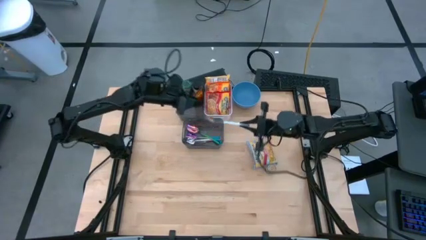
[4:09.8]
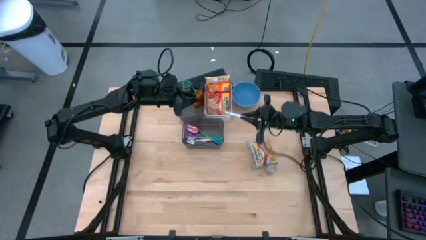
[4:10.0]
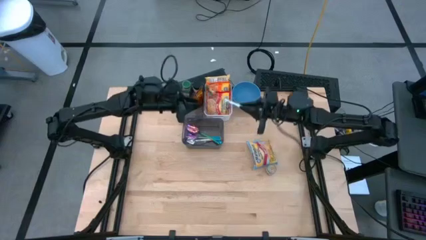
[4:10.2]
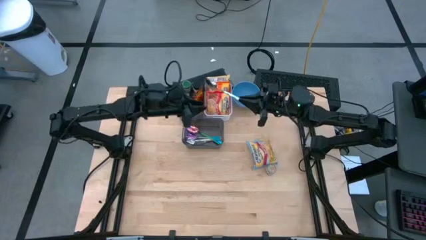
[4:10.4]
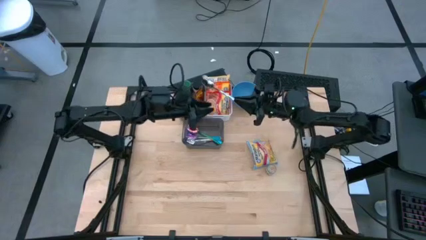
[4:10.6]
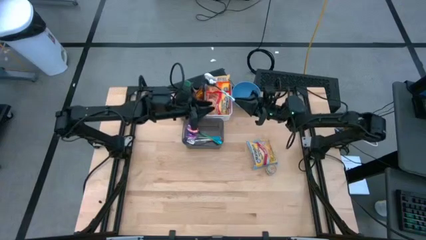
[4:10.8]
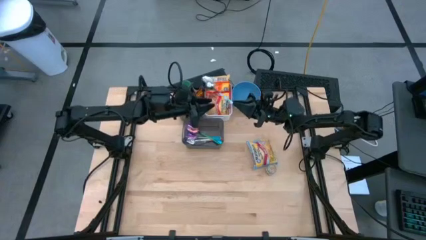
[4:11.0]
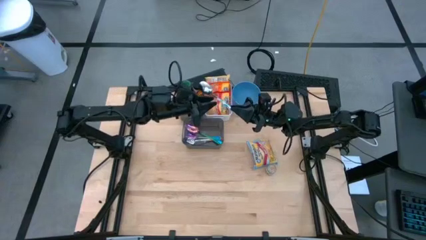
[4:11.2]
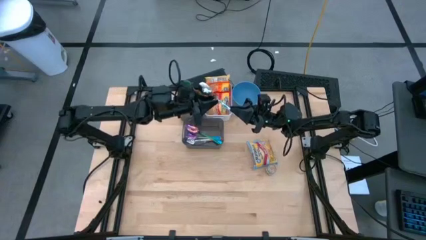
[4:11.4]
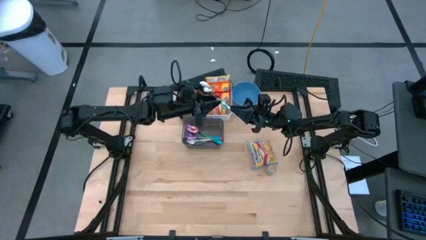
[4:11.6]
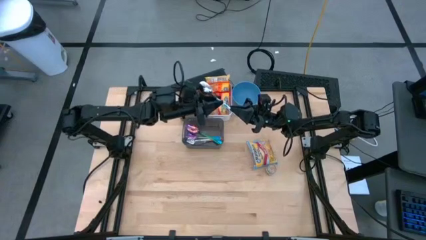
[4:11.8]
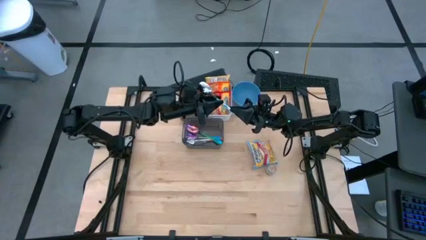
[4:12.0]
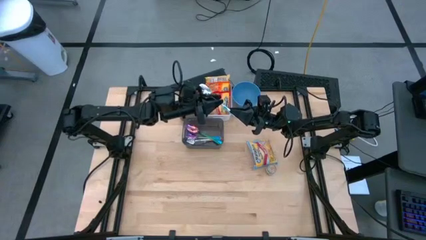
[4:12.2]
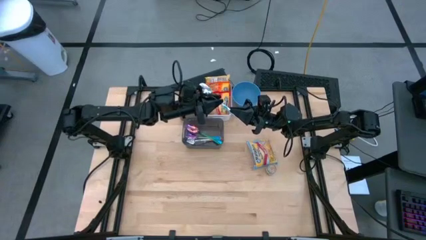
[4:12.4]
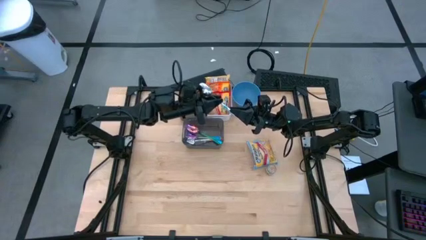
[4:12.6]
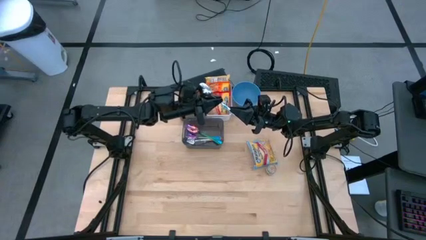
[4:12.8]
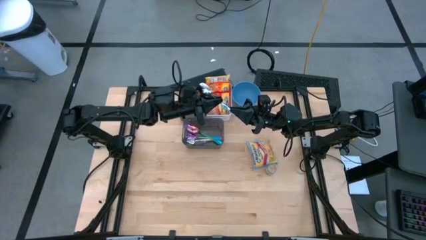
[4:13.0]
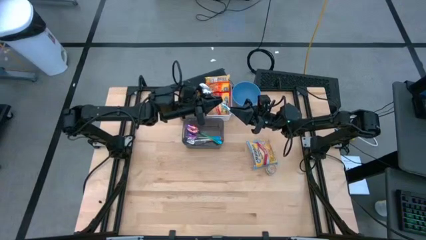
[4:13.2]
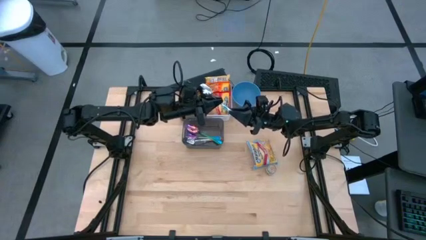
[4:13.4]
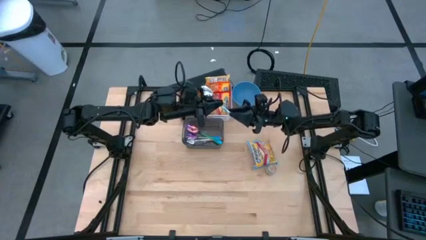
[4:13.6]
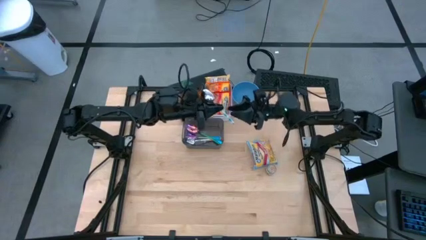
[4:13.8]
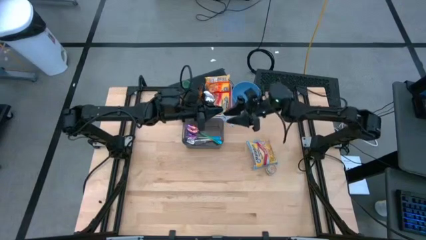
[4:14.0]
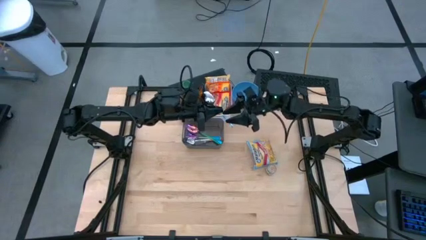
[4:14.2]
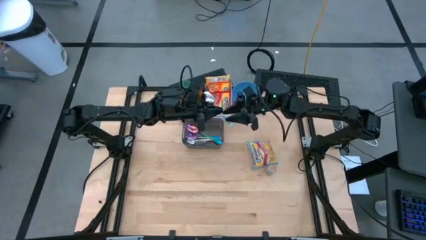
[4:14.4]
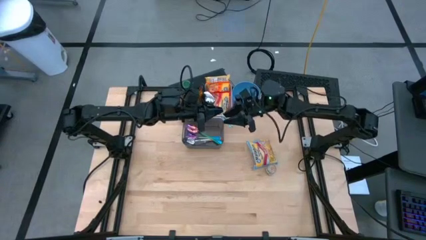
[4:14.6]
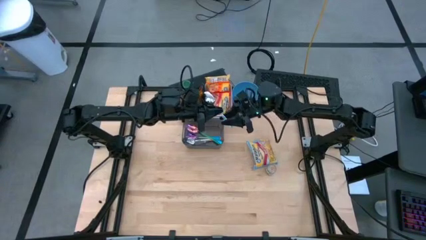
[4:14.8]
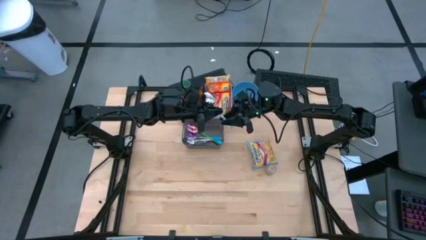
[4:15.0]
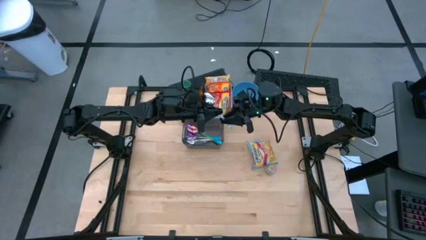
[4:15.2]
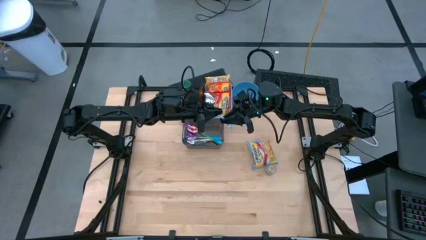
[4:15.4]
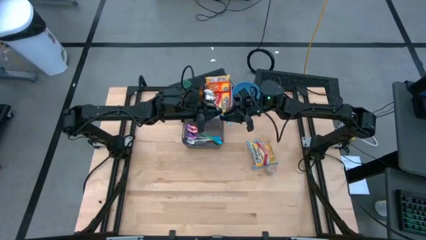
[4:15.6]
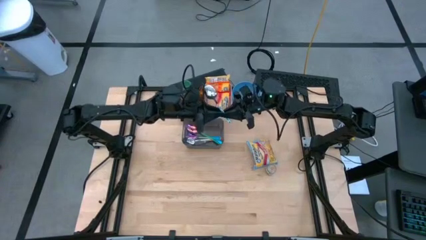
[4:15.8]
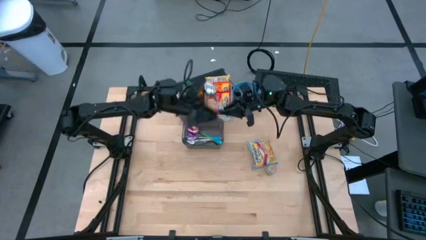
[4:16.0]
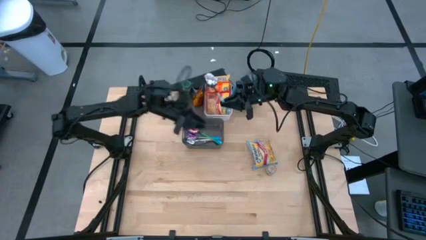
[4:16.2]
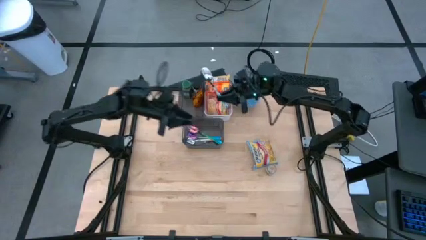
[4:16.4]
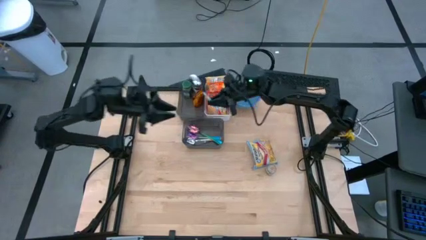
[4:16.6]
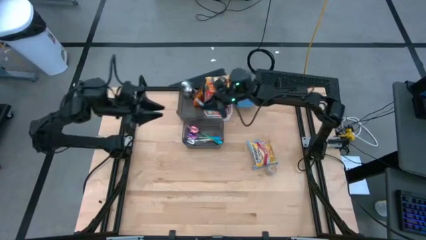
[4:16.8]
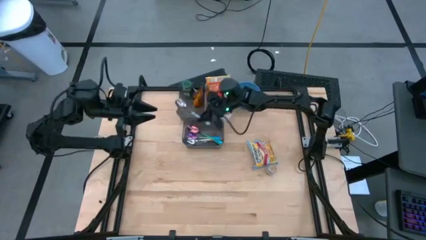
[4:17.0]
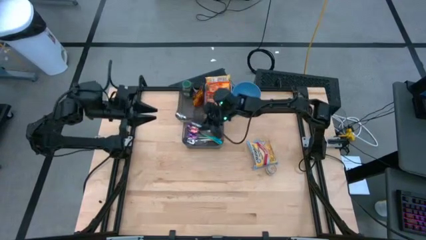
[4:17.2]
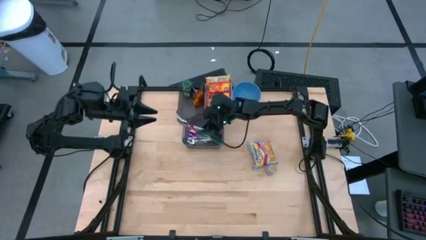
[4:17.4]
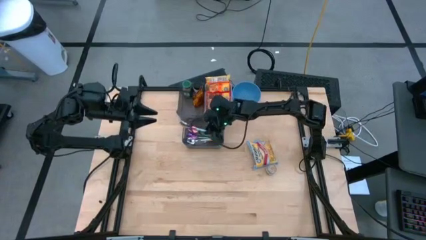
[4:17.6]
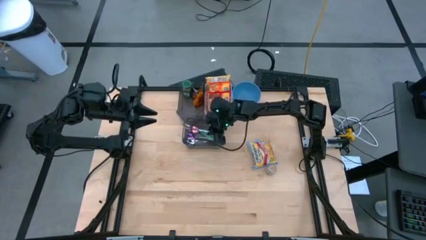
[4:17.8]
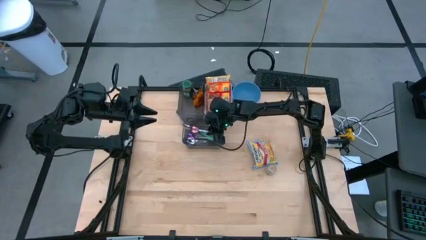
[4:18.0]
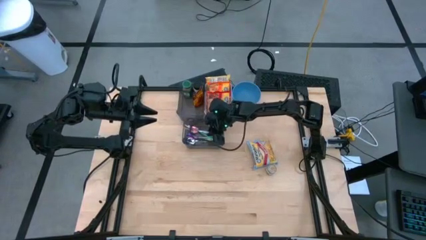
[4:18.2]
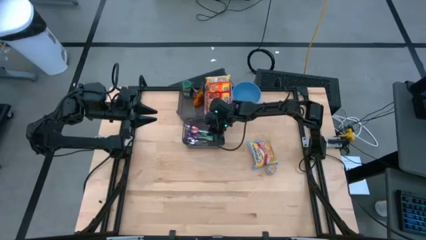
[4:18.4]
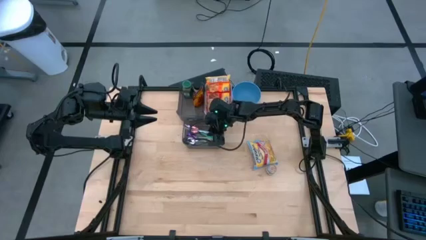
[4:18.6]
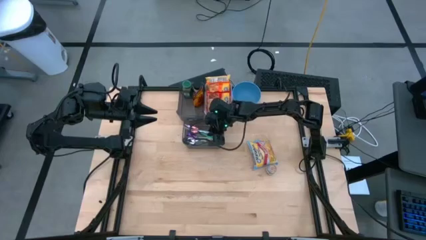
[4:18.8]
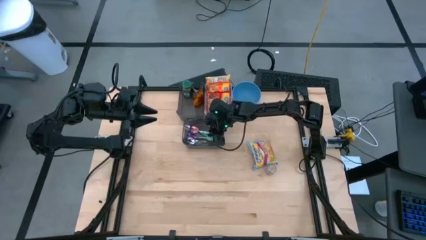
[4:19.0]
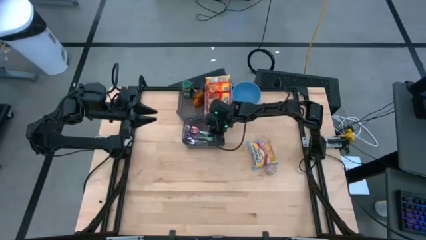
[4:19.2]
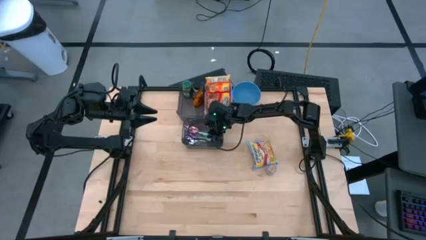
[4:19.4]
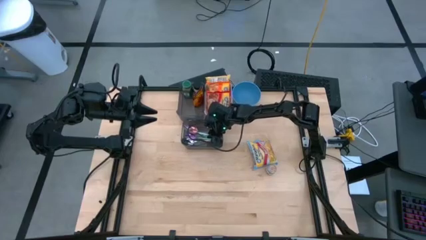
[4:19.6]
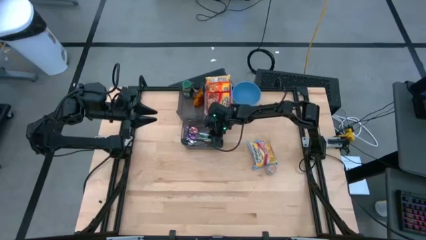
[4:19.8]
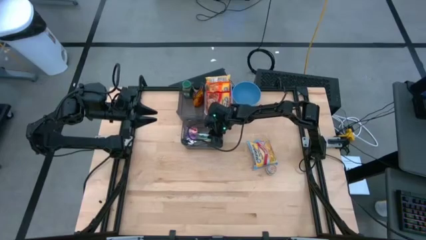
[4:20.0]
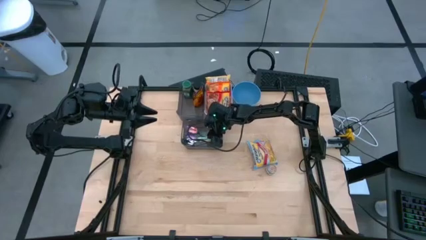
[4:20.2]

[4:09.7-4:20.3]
Task: Pick & Place Food Item
Put the blue patterned spoon into the bottom black bin

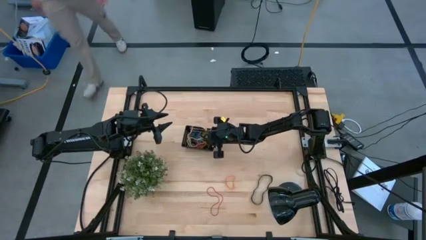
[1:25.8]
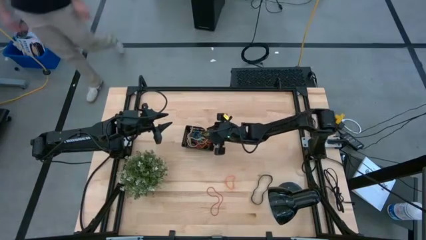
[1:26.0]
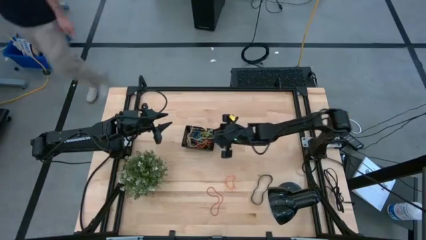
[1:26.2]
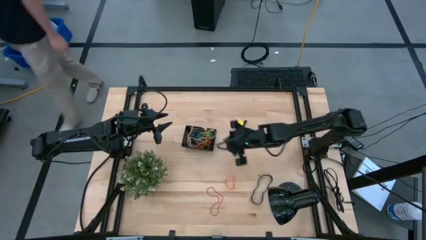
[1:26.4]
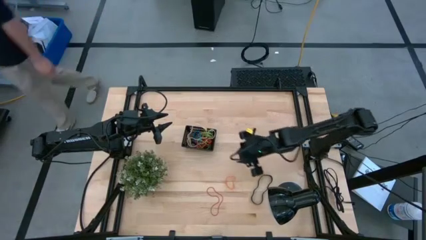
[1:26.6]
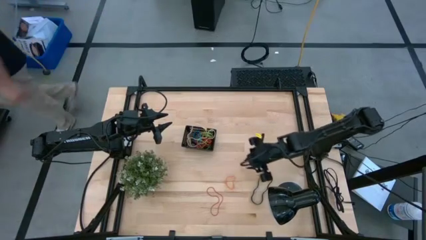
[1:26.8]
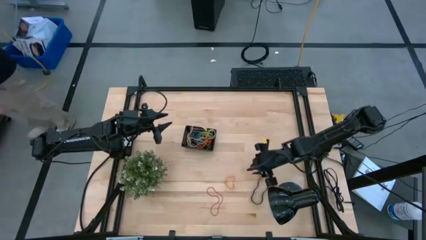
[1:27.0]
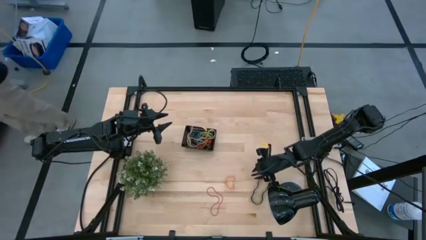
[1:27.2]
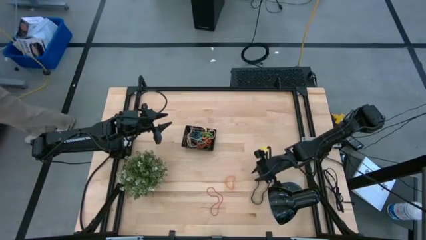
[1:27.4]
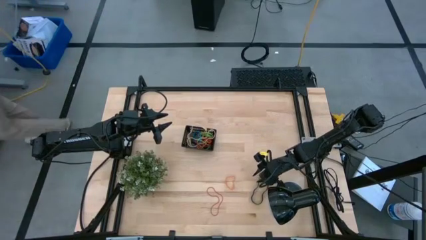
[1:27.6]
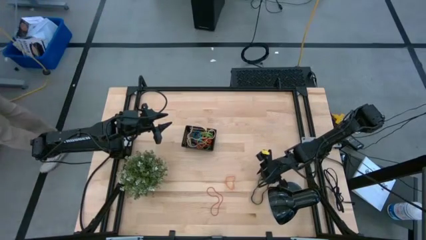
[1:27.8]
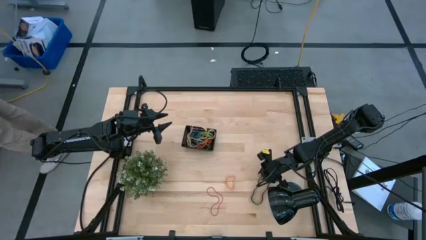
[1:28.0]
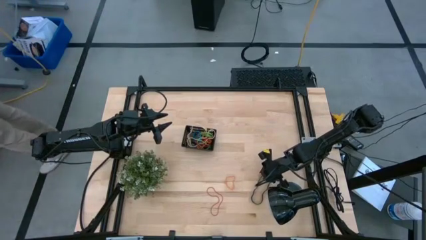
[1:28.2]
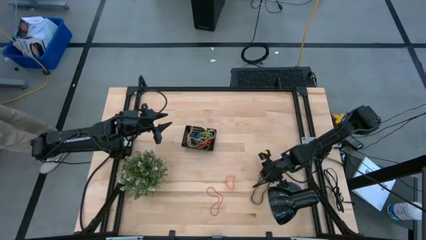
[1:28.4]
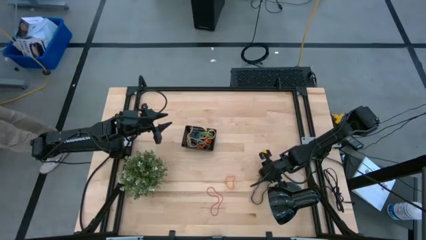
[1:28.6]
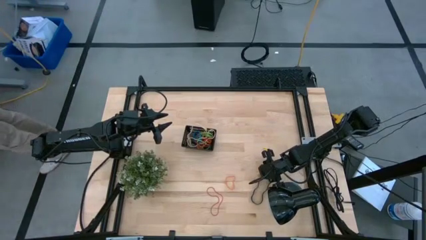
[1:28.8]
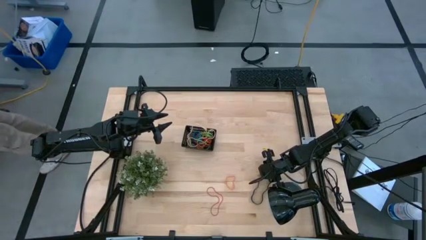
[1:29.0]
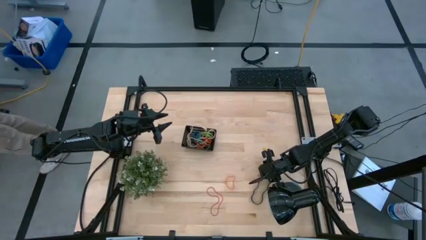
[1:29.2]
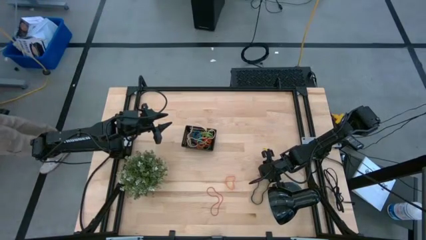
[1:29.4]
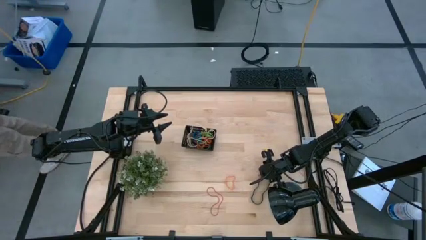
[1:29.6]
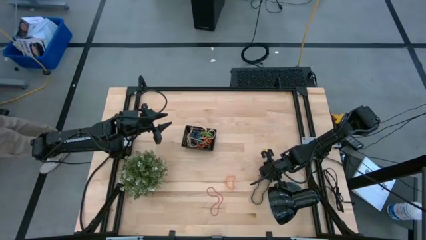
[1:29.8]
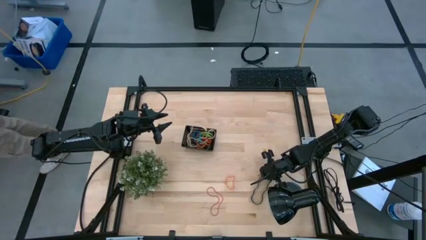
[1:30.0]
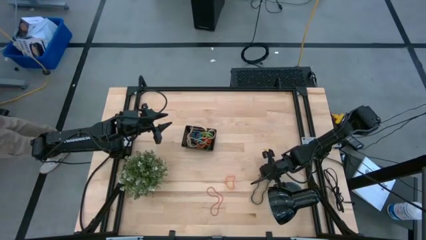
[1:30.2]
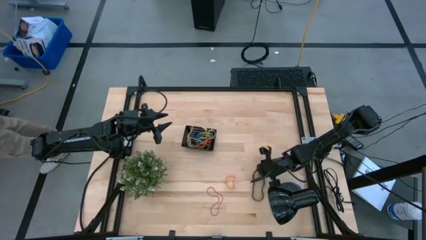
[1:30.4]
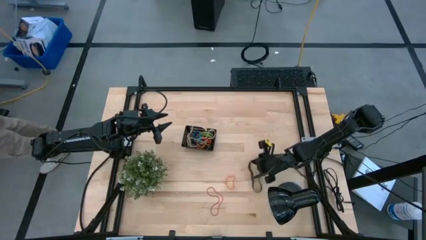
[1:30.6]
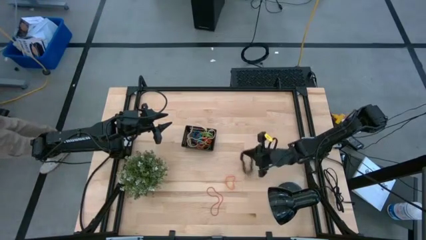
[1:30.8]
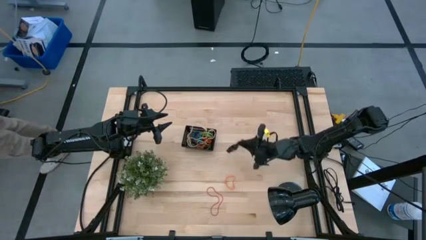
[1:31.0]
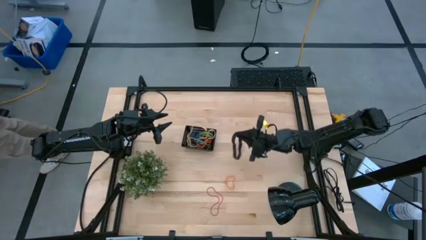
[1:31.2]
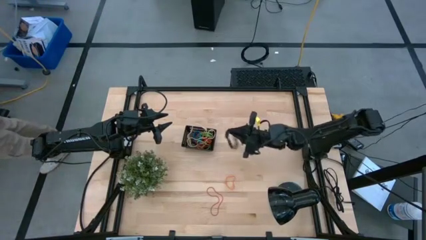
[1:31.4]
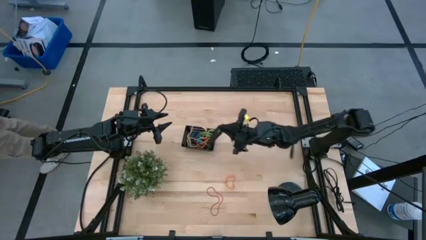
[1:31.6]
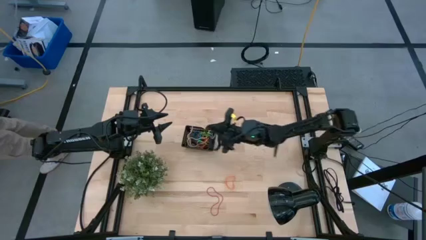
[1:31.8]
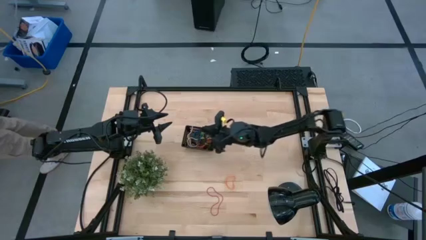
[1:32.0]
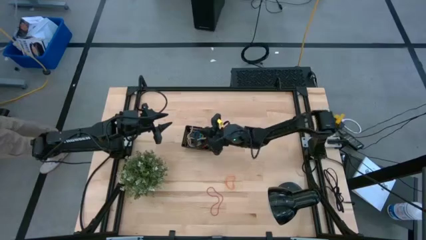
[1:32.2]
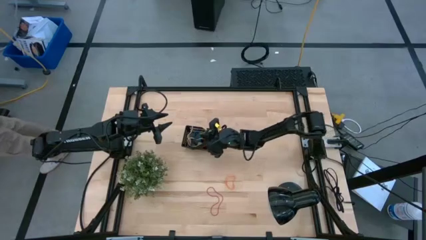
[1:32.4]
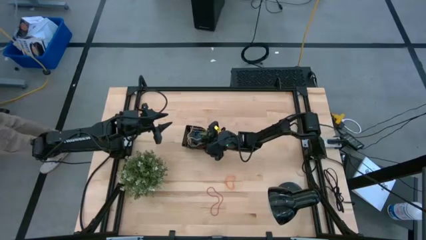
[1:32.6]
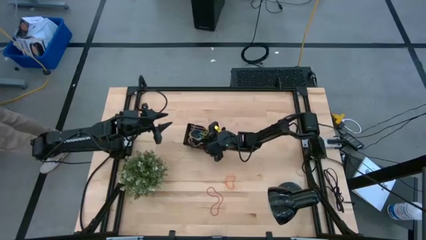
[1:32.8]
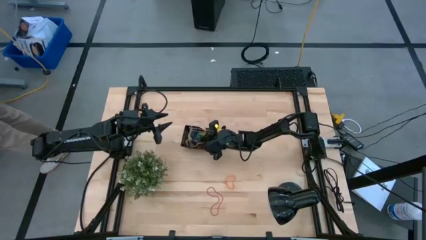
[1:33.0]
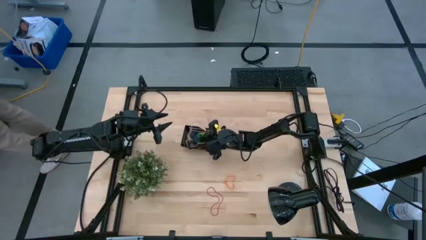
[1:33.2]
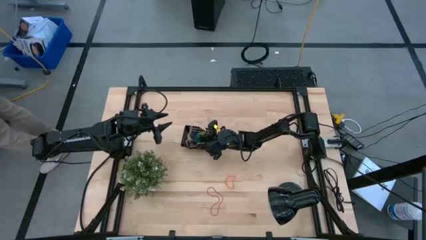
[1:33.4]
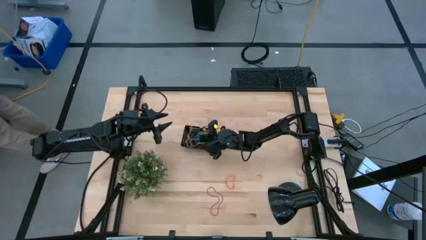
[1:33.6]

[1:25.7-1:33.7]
Task: Pick and place rubber bands into bin
Put the black rubber band into the black bin
